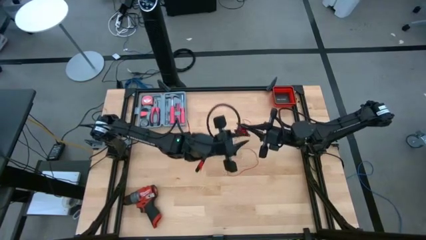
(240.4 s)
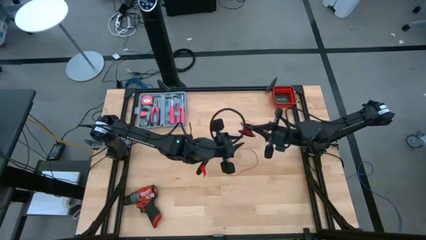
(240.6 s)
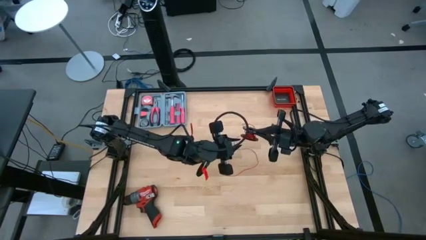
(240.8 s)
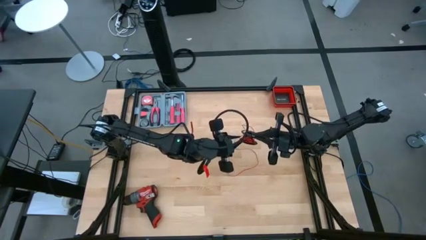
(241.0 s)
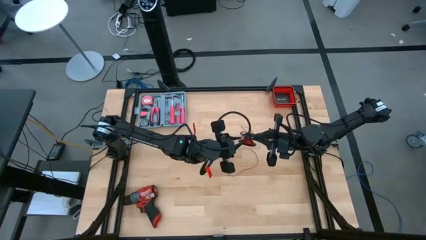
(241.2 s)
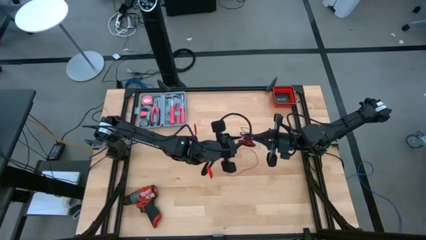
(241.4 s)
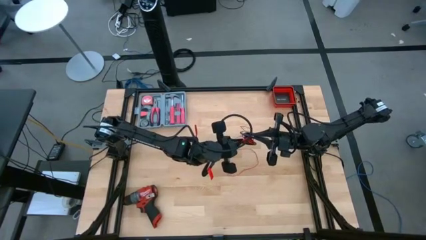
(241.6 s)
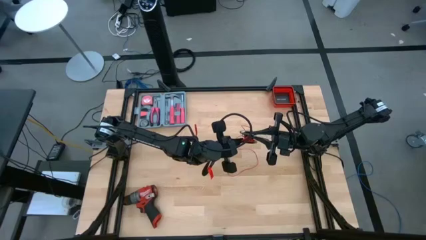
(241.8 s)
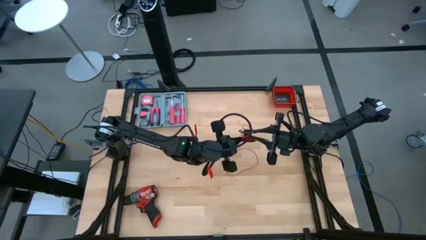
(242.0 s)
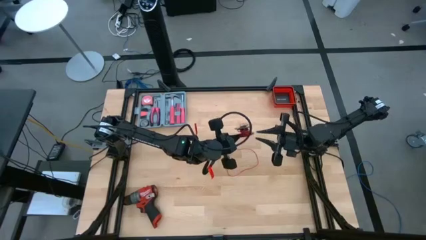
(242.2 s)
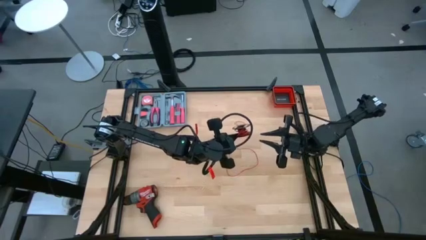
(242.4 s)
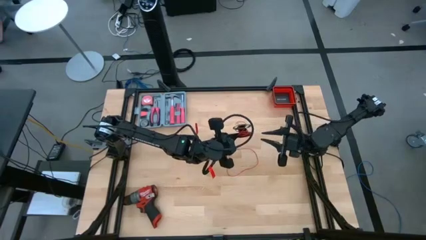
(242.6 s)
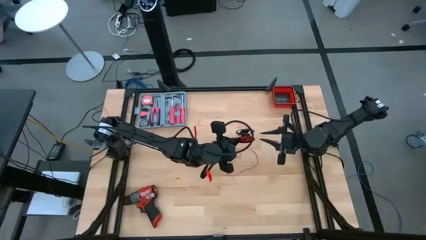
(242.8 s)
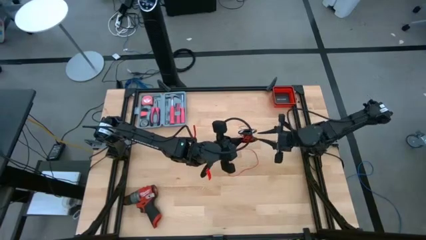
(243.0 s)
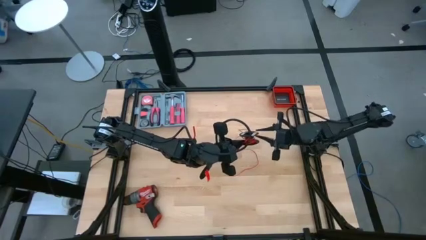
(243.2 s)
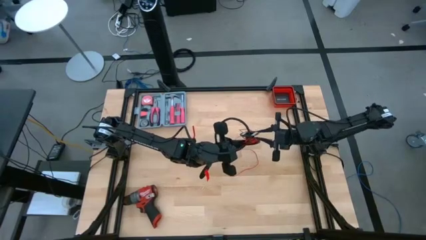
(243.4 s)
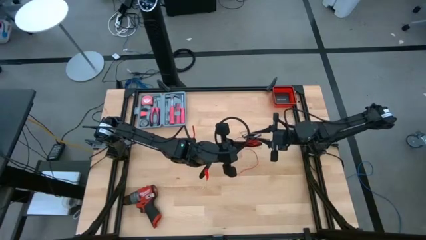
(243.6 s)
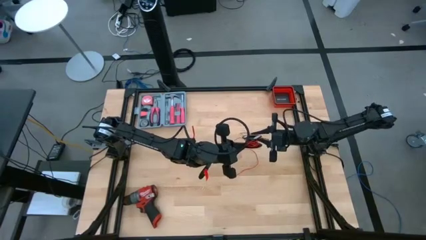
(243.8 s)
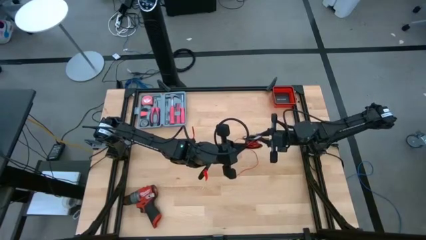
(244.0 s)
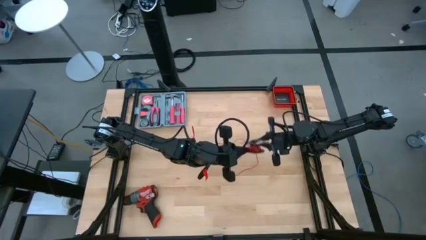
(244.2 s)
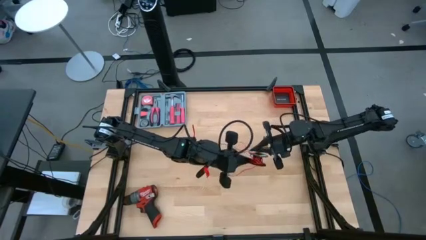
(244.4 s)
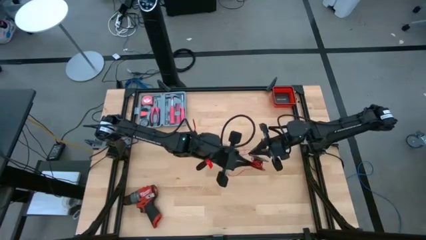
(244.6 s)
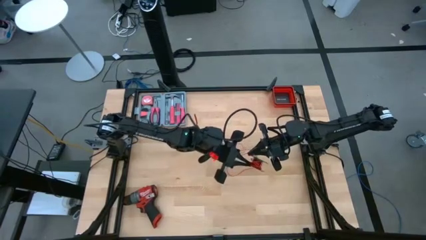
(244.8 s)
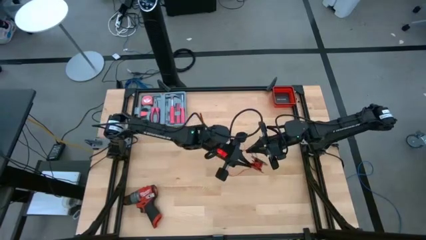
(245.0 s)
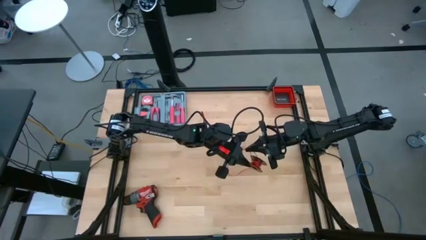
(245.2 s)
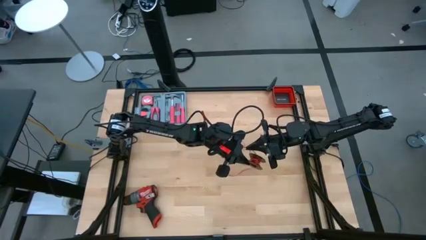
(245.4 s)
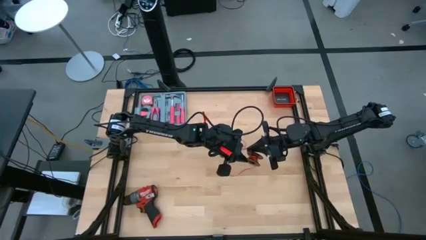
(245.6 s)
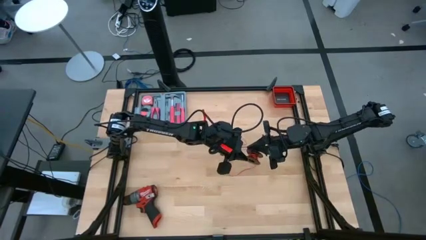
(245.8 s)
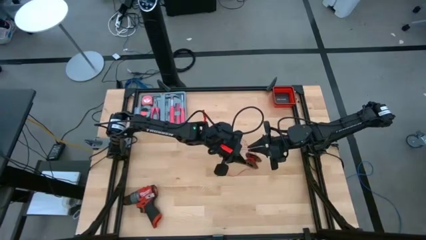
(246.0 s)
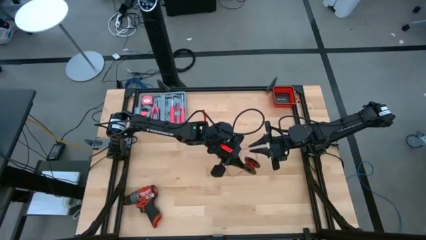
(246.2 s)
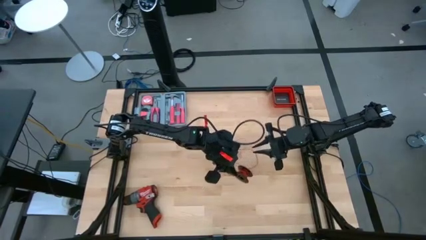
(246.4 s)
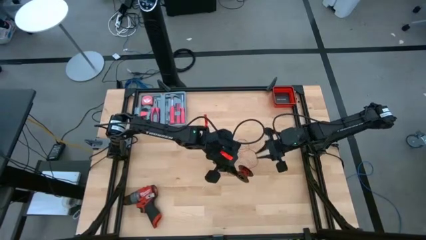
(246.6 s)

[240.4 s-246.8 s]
Task: Coil cords
Coil the red wire on the black spool

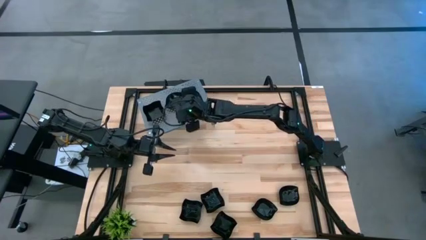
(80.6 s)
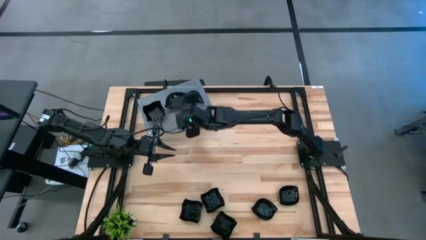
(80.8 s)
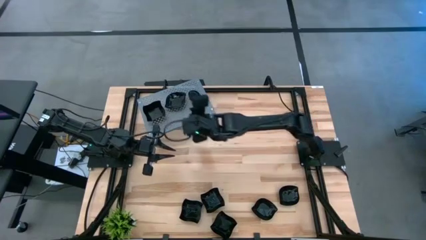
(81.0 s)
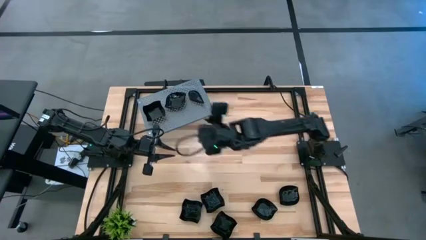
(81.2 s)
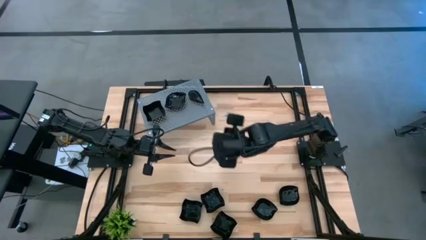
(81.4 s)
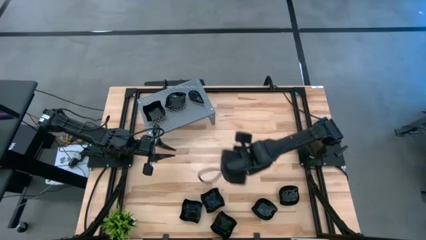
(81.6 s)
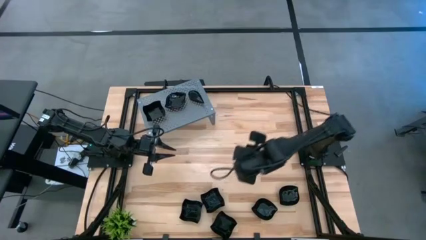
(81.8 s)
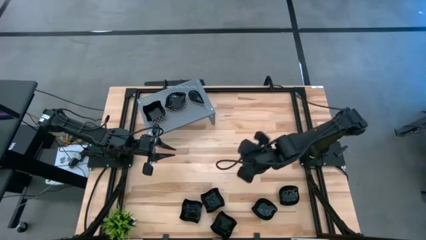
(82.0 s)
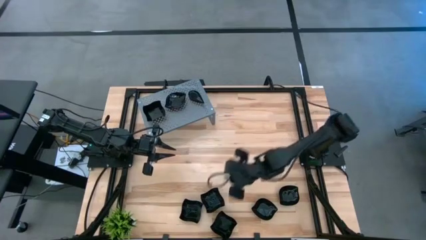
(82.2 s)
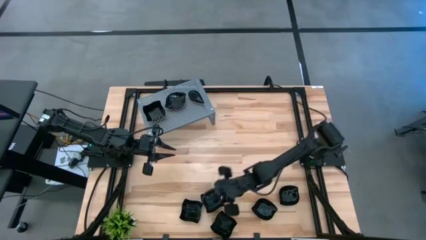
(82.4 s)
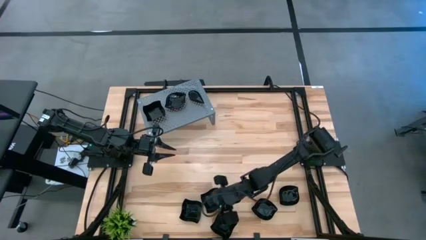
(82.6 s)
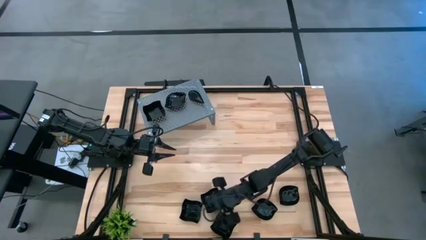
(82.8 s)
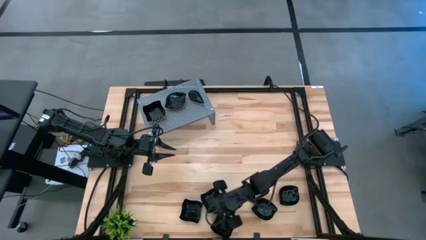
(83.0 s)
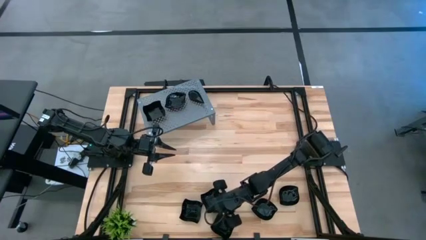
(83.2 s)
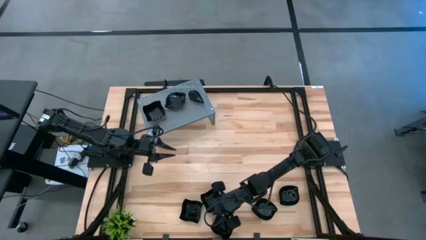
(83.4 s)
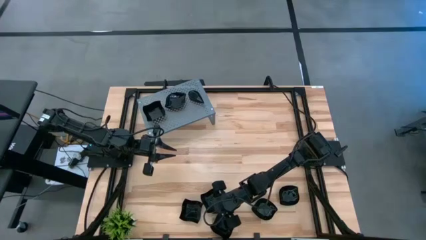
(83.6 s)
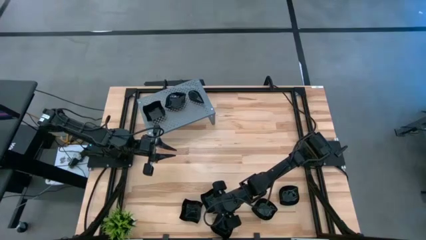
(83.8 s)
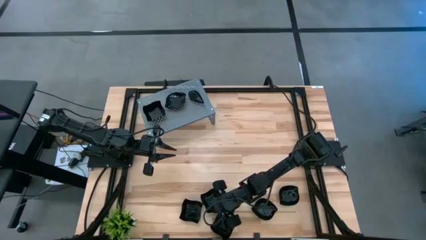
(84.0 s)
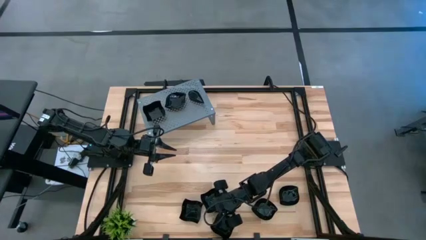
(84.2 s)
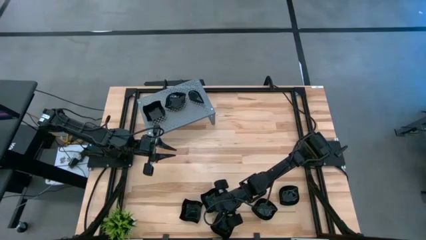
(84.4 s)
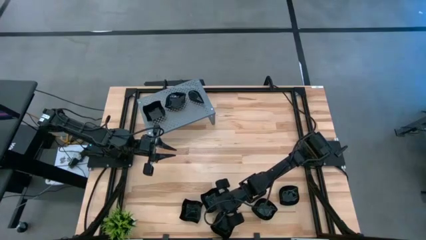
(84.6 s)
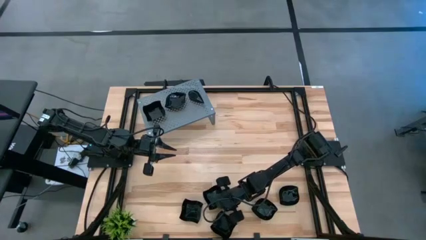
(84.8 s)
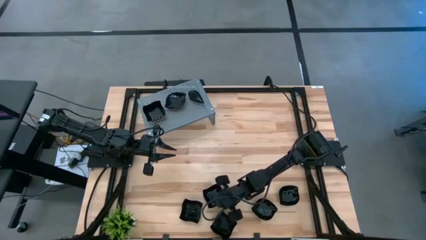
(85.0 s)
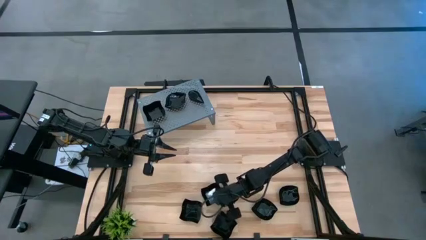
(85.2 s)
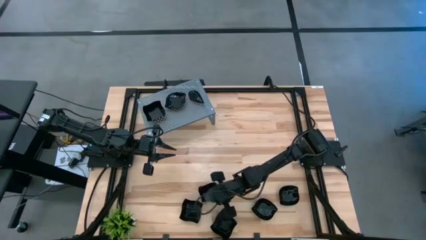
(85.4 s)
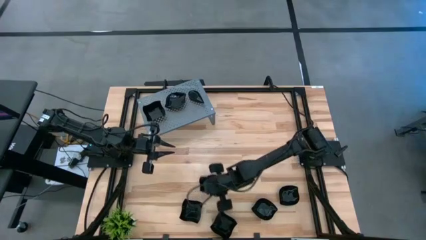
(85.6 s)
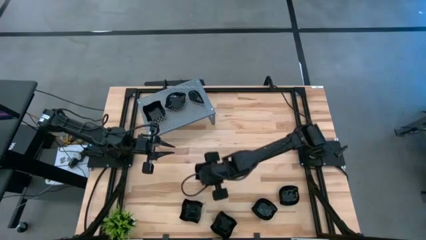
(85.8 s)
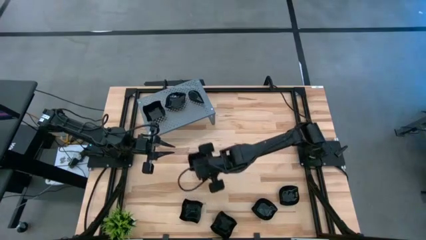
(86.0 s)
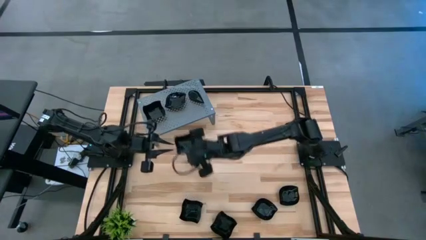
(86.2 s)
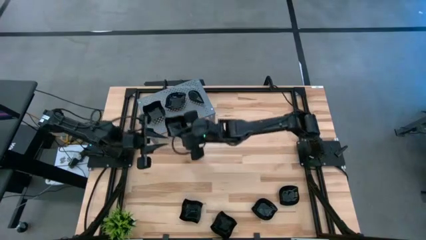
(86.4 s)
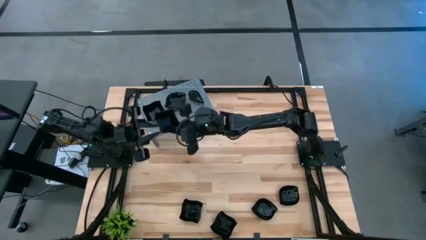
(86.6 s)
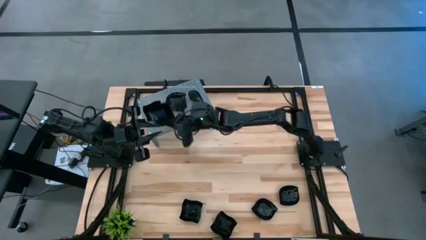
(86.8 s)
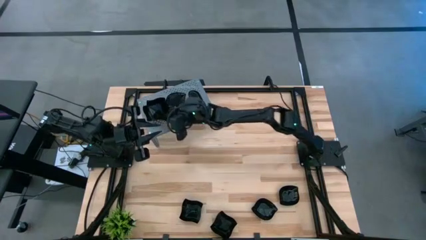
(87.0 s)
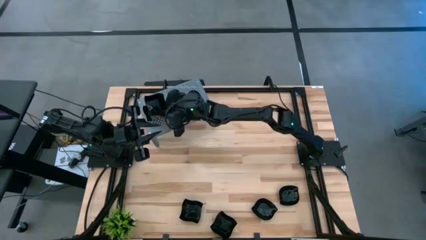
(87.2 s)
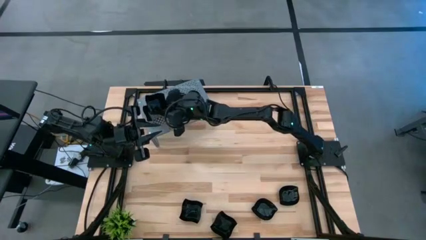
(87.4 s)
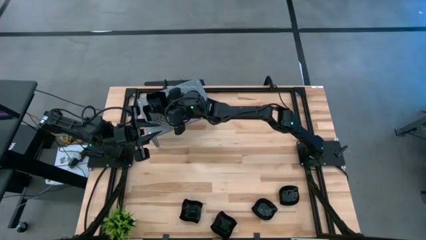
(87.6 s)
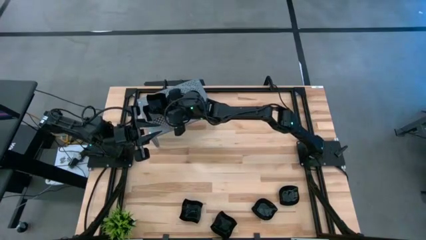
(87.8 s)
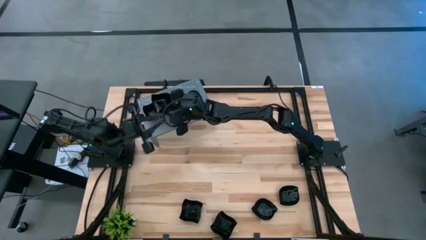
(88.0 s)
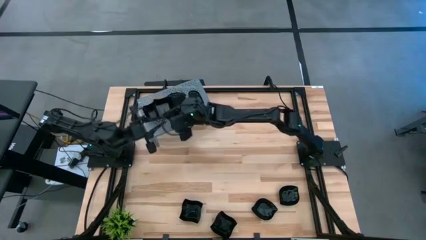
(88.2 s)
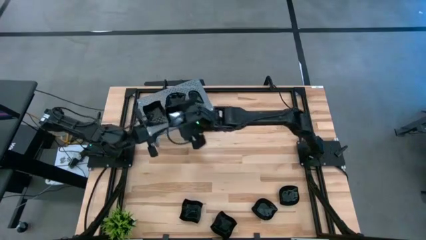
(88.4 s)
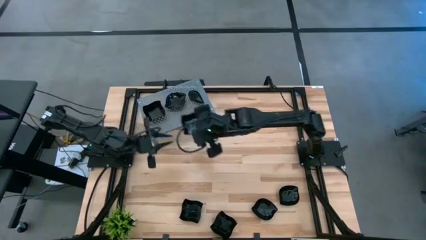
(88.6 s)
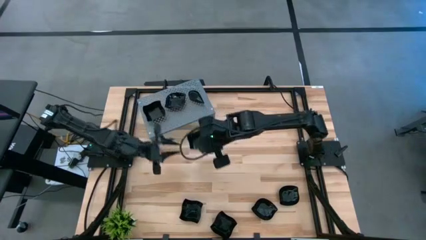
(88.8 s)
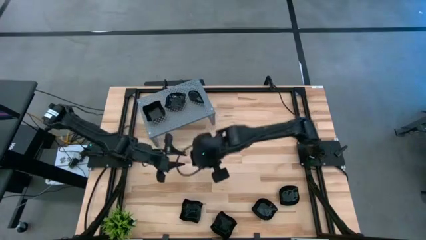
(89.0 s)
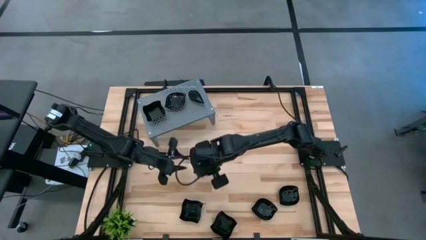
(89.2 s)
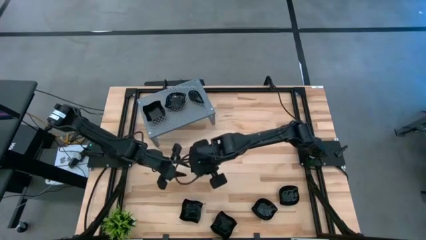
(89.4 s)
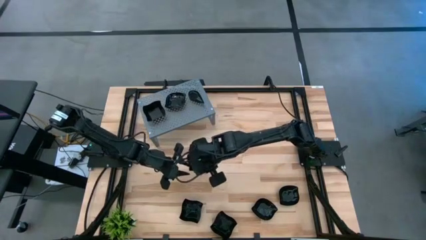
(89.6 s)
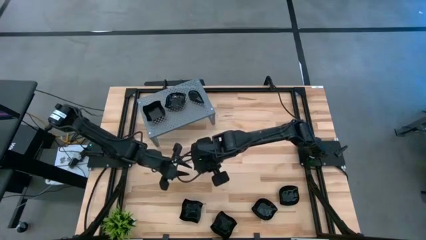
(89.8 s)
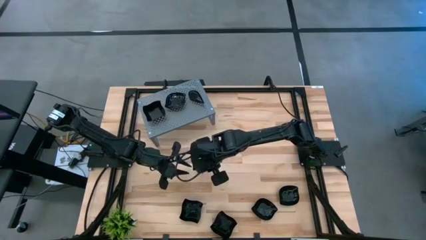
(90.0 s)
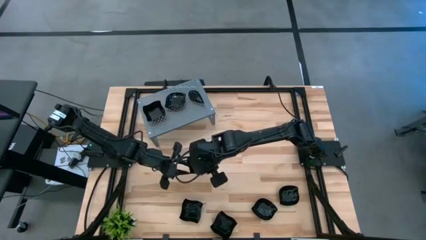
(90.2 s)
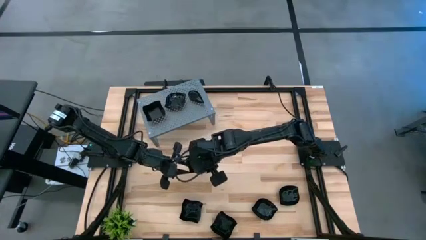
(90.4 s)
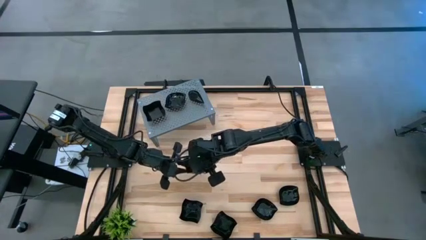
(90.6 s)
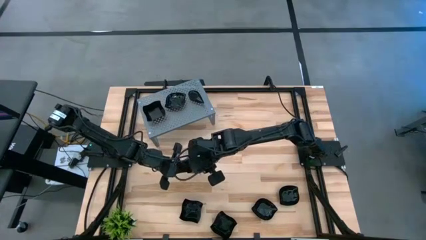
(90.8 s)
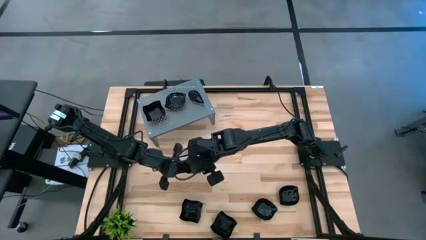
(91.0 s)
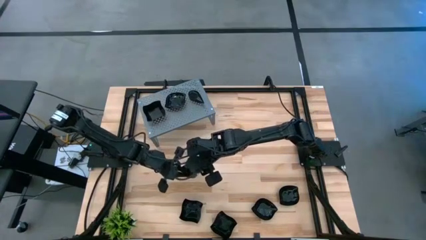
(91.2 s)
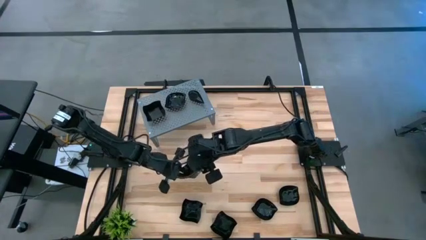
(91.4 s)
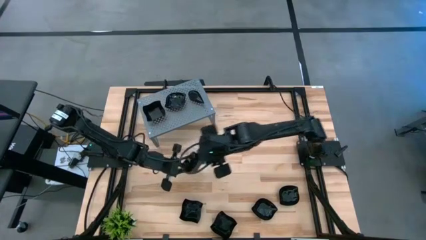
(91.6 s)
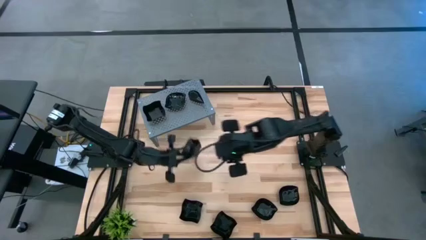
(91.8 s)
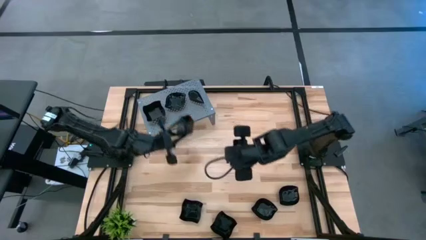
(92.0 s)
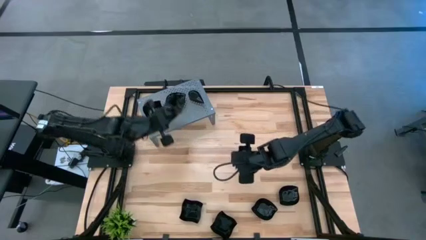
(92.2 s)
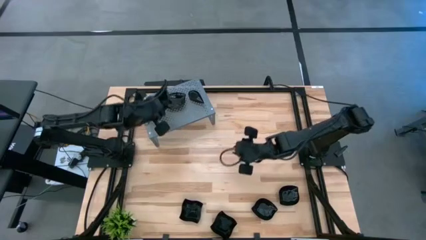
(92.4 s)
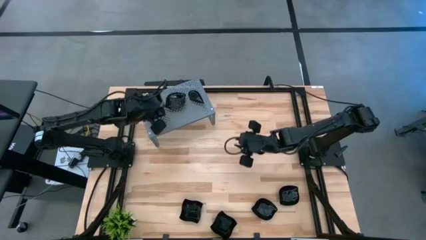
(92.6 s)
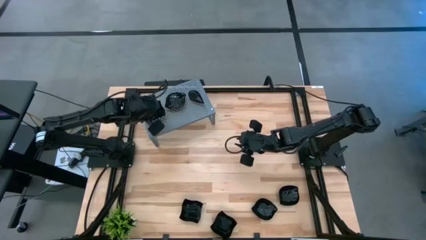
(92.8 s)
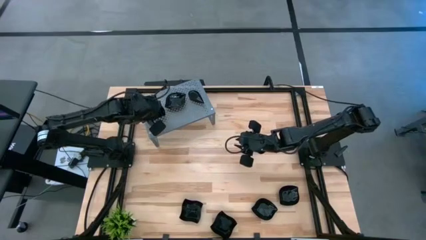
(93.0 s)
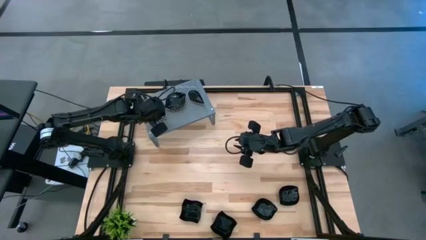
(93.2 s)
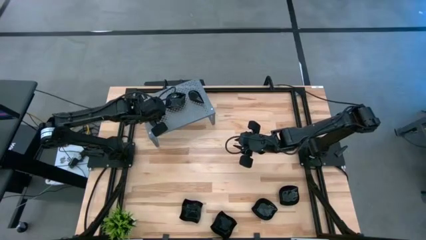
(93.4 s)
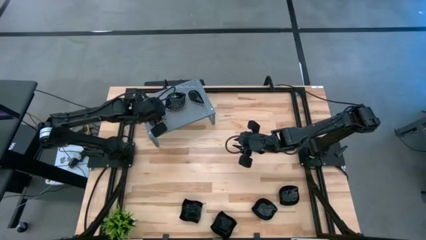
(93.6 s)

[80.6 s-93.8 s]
Task: Pick & Place Mini shaped plates
Stack the black distorted square plate on top of the black distorted square plate on the shelf
